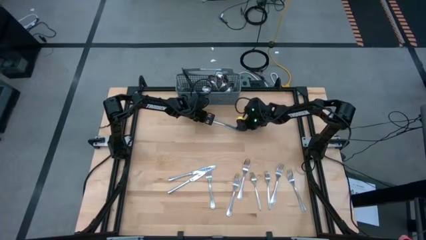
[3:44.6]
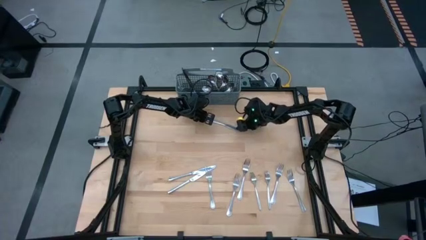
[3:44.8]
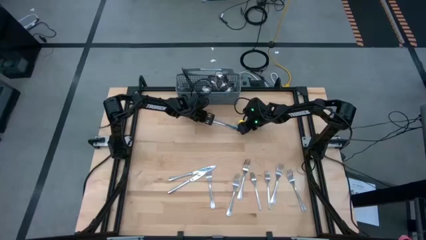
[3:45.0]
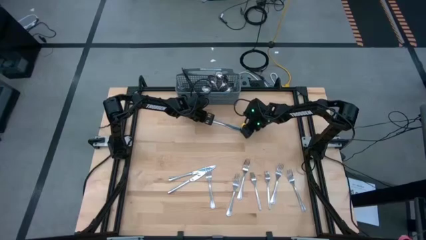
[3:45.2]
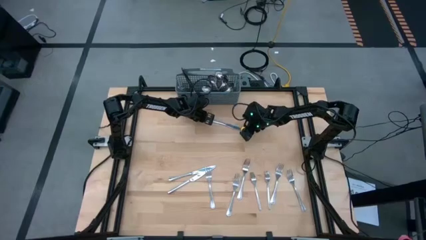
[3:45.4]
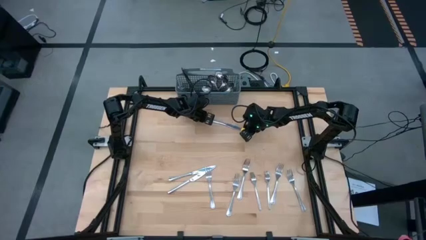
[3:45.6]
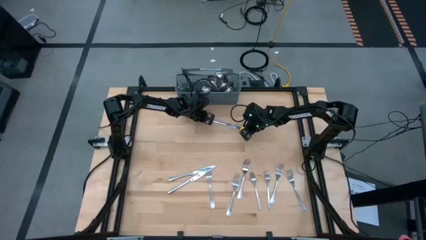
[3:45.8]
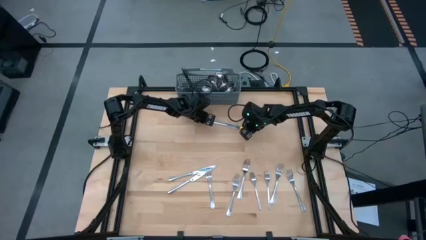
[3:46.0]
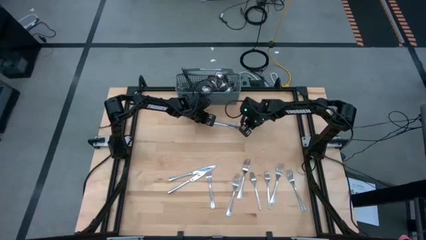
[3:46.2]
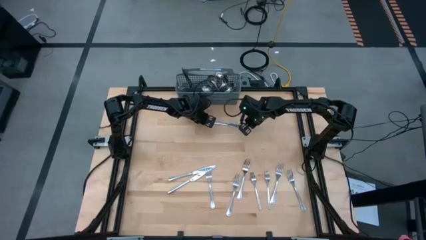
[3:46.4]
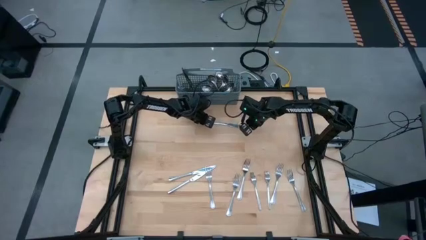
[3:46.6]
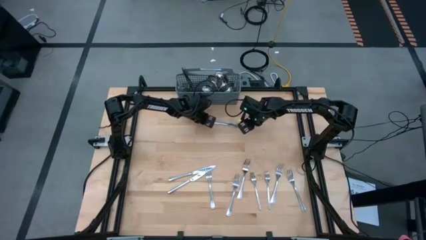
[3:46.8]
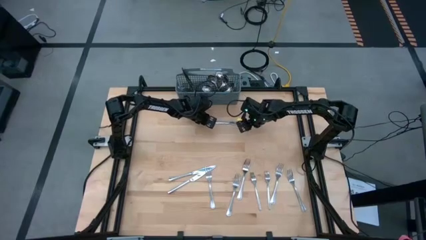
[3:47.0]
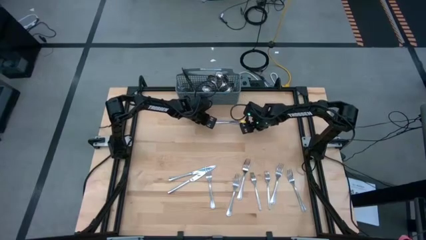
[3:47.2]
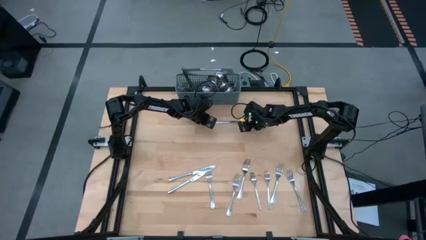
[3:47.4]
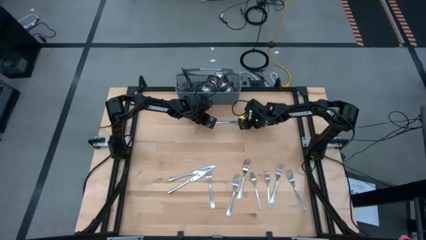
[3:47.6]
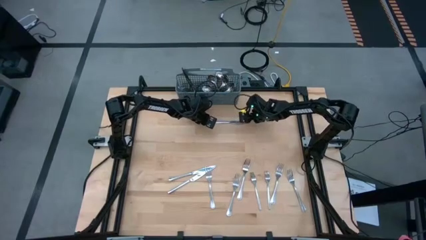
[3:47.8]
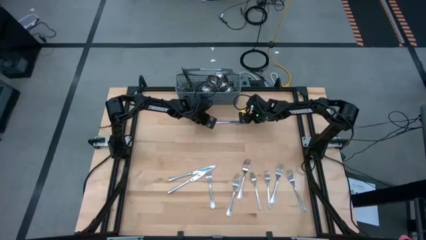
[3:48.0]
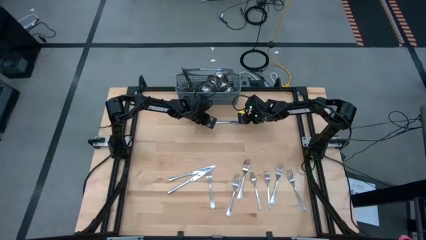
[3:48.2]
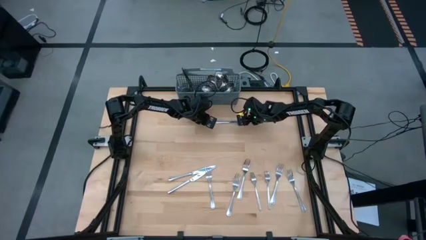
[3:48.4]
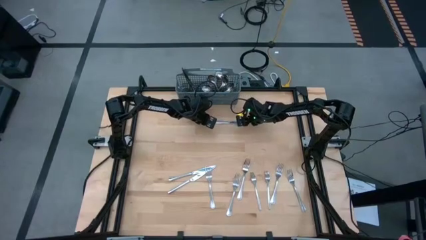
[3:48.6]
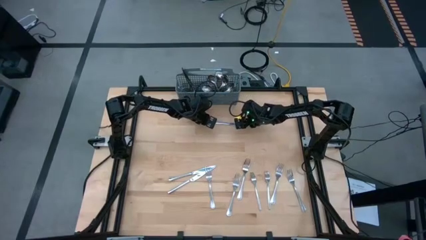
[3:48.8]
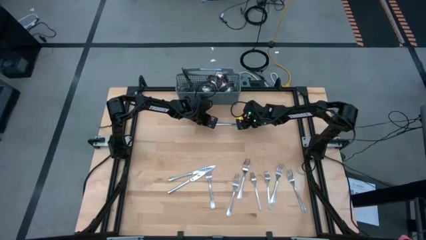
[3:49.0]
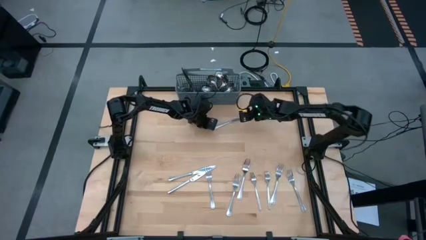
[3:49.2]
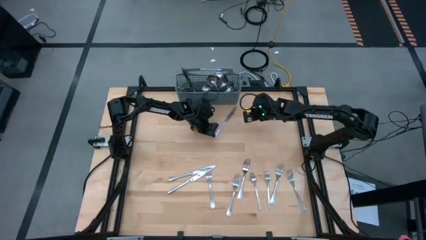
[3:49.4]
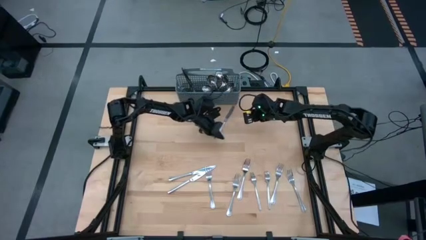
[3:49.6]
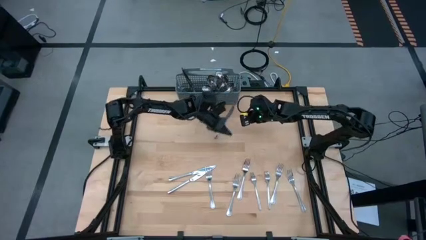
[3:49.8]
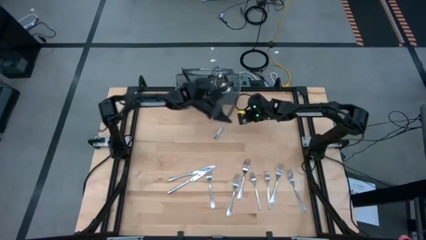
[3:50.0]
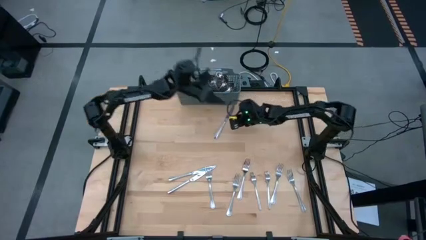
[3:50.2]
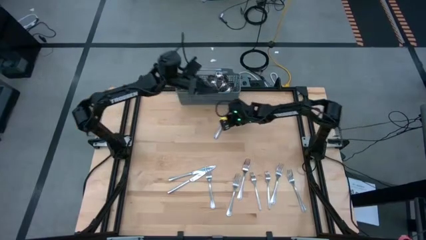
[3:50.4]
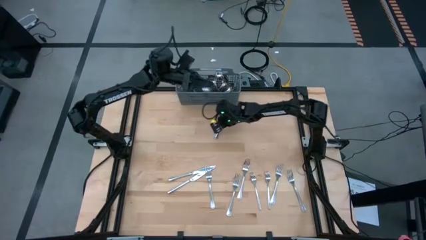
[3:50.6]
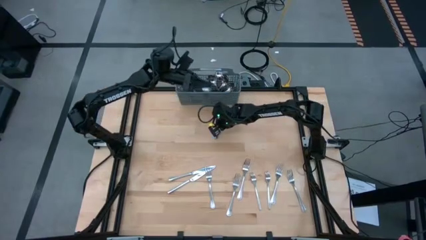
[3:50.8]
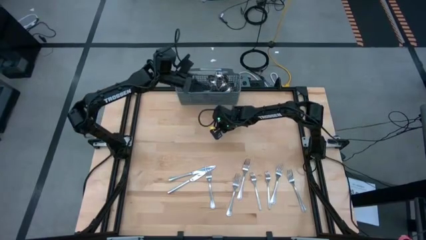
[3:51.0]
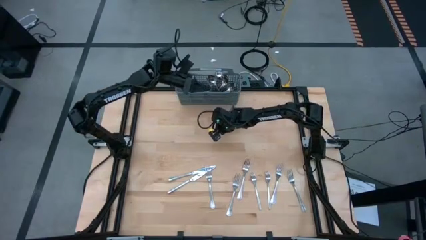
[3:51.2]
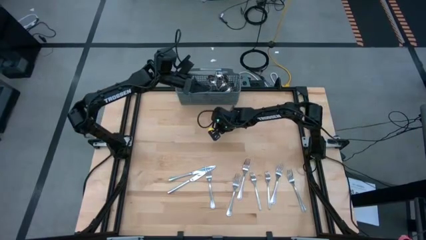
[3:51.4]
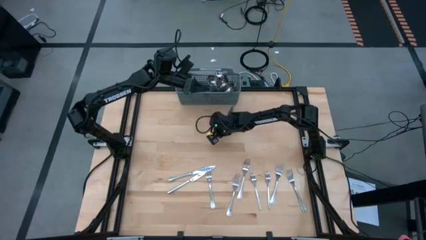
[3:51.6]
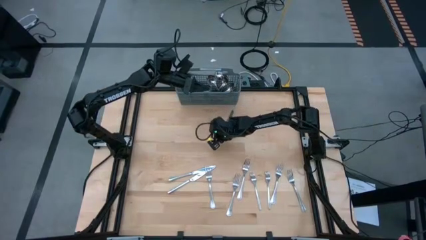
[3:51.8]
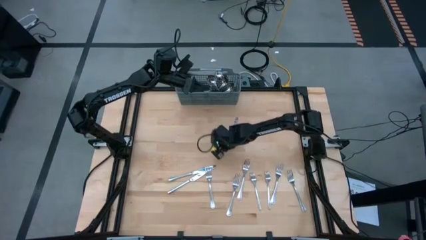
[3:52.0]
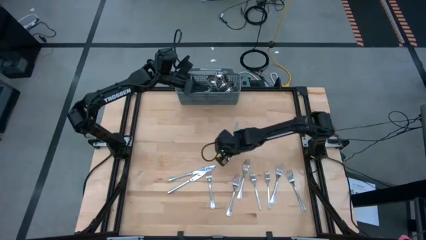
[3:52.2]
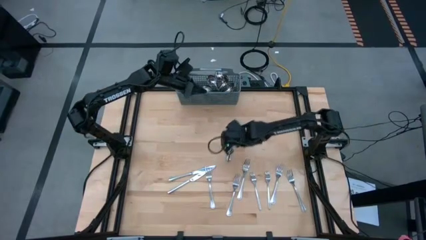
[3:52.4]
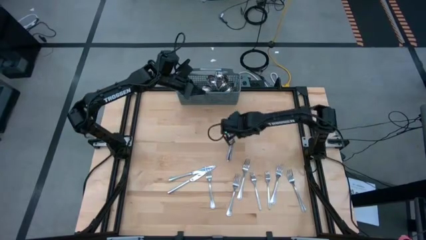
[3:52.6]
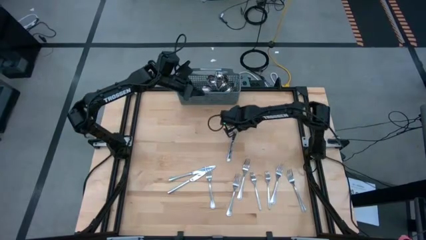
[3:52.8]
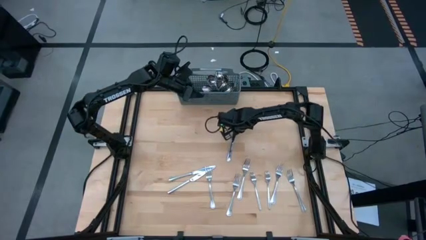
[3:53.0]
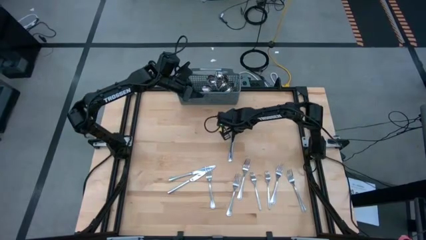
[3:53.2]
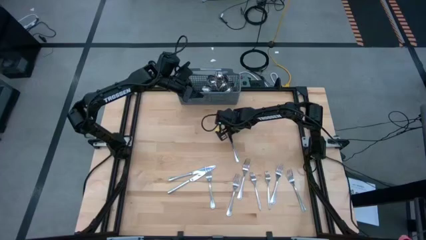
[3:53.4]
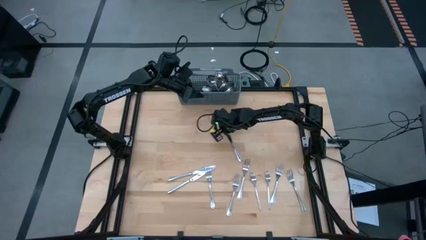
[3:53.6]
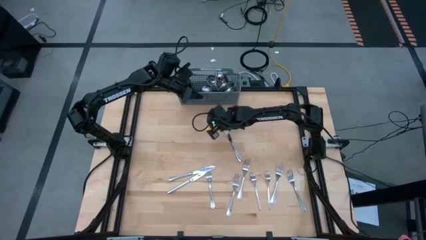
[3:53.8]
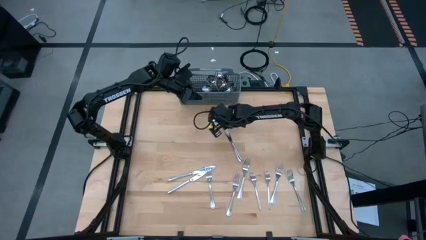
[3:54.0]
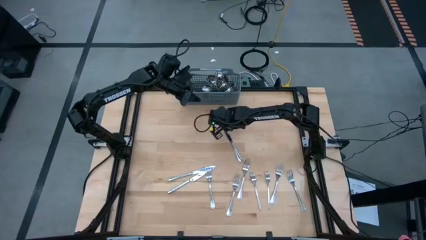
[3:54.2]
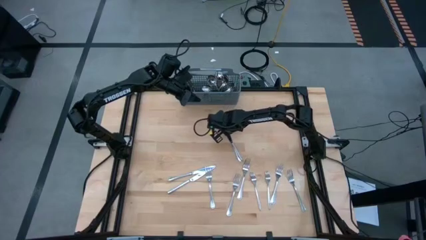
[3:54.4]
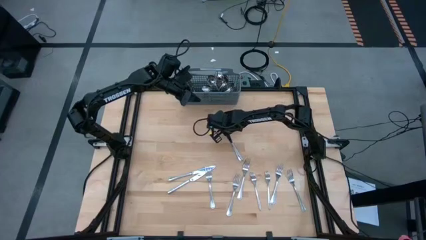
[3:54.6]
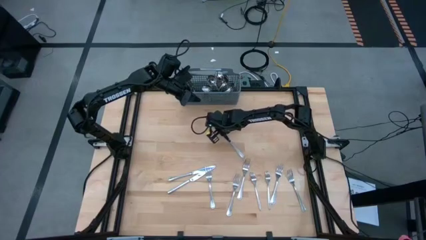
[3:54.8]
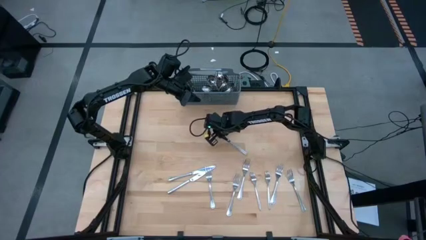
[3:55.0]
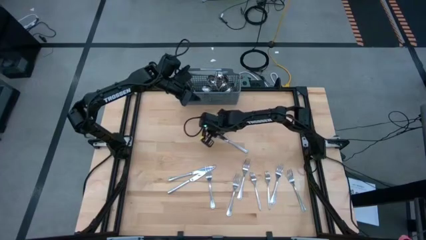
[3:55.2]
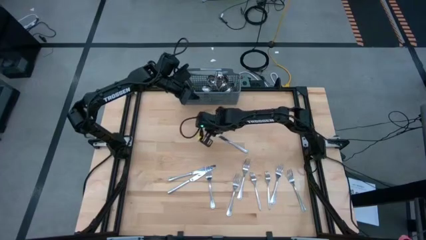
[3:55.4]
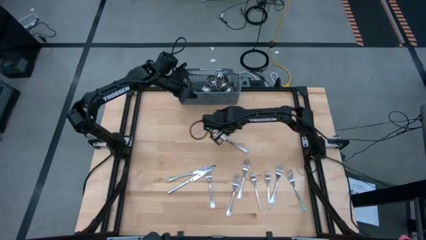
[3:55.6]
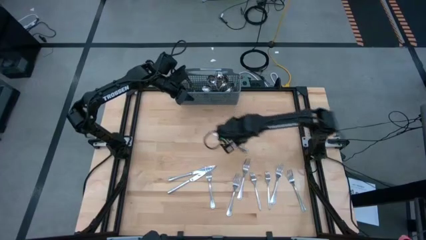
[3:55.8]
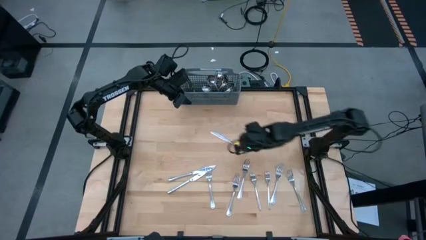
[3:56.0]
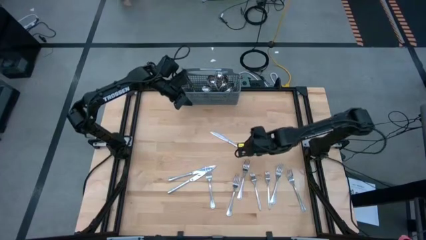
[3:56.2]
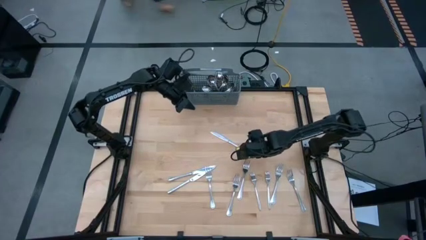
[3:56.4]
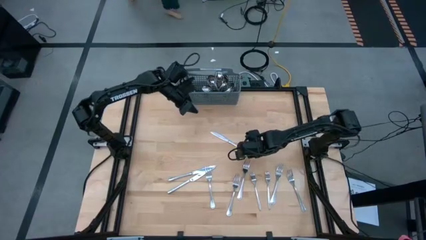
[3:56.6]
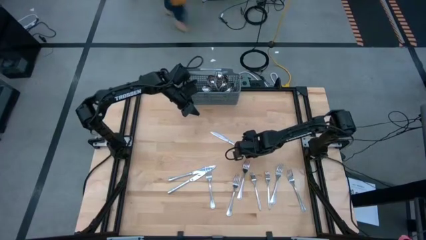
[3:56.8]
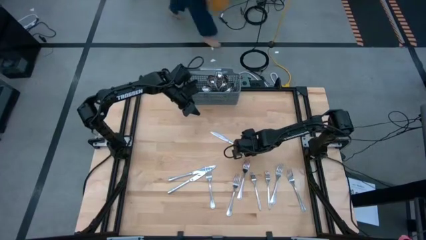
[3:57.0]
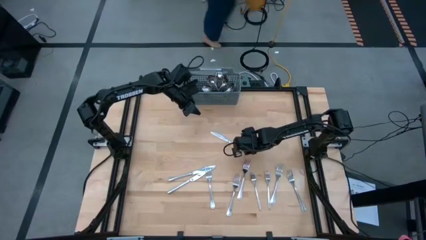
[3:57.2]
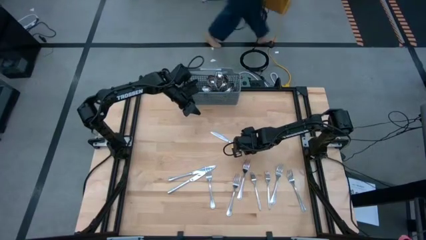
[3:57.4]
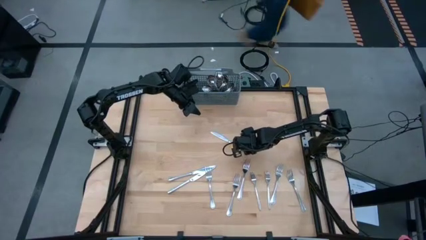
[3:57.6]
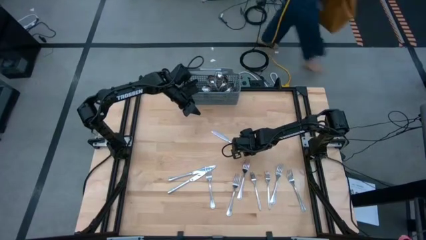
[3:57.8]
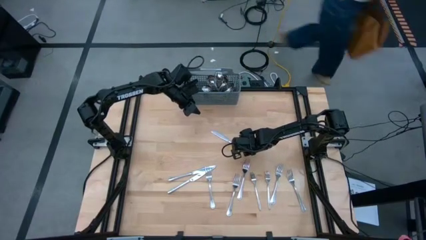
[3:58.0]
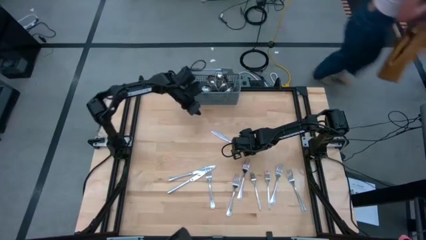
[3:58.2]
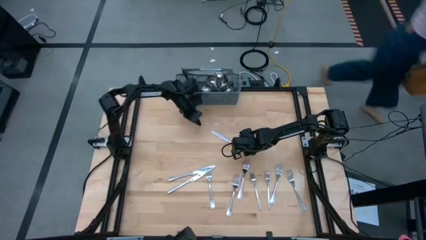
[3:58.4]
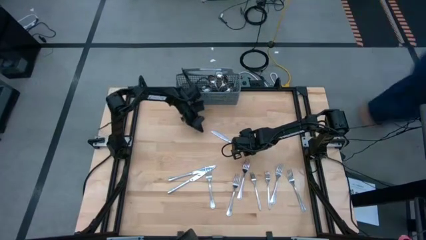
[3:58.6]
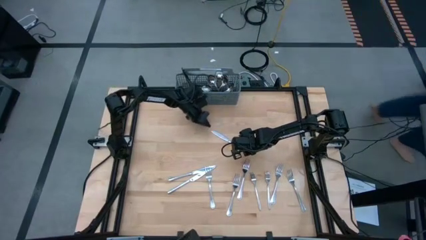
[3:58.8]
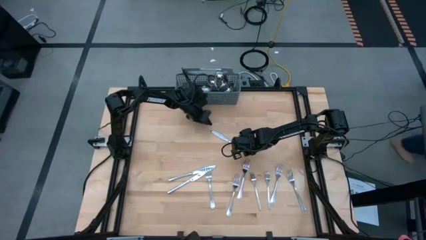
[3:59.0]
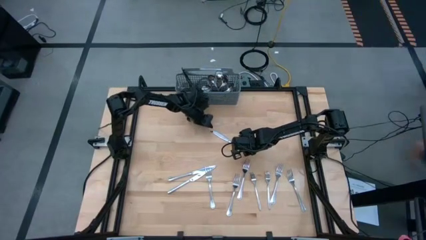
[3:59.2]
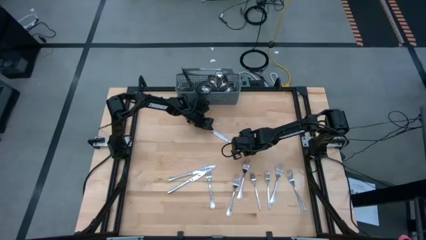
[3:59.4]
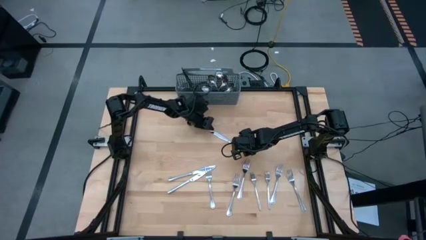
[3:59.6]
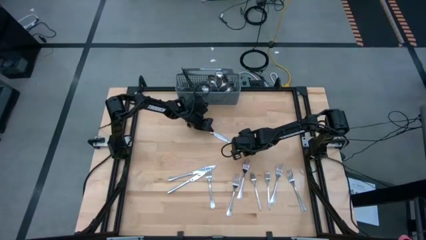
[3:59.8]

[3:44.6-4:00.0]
Task: Sort silverware
Put the silver knife into the gray utensil holder
